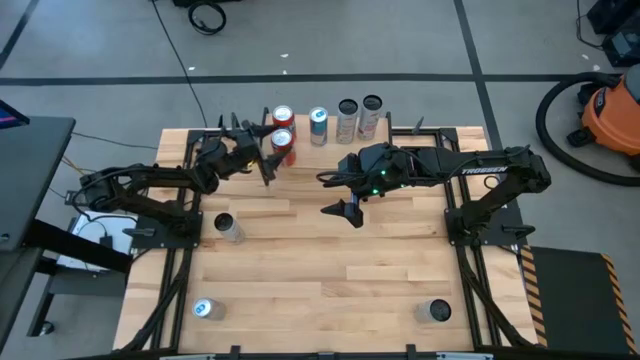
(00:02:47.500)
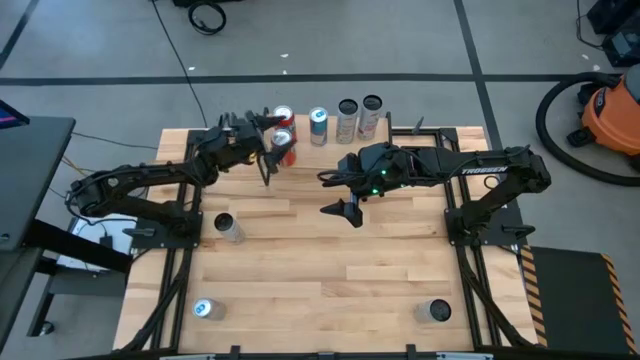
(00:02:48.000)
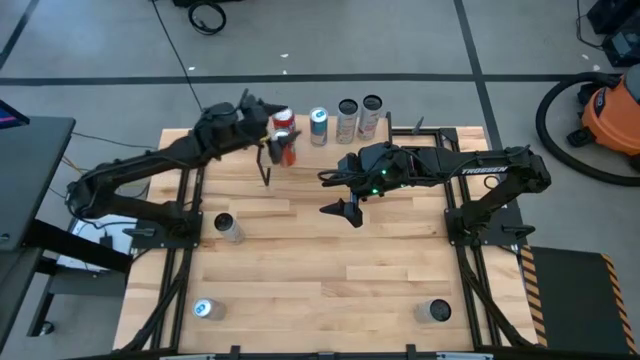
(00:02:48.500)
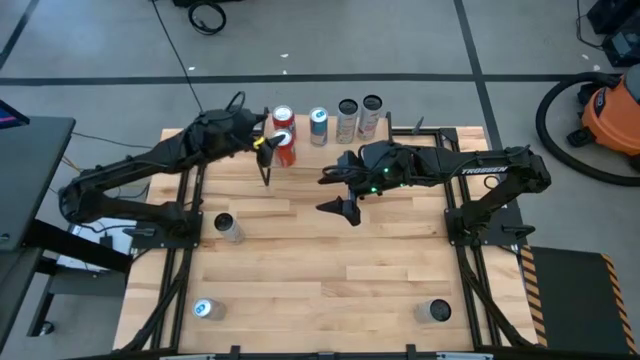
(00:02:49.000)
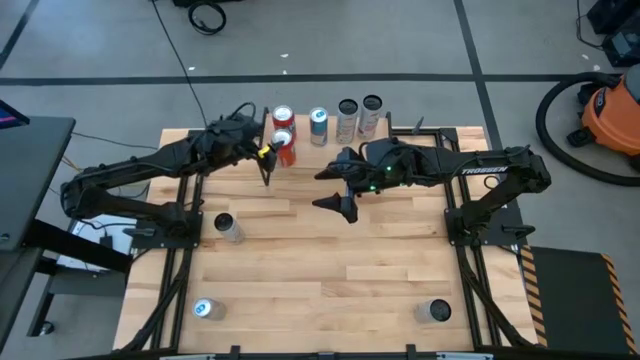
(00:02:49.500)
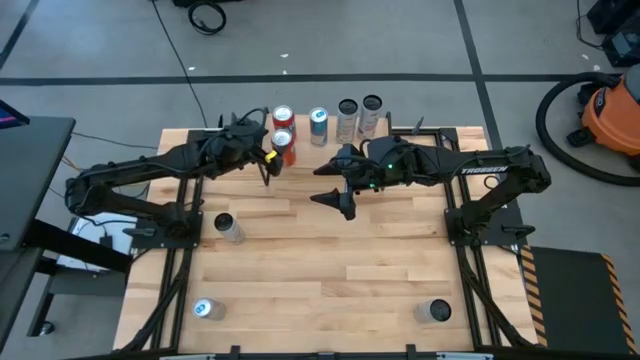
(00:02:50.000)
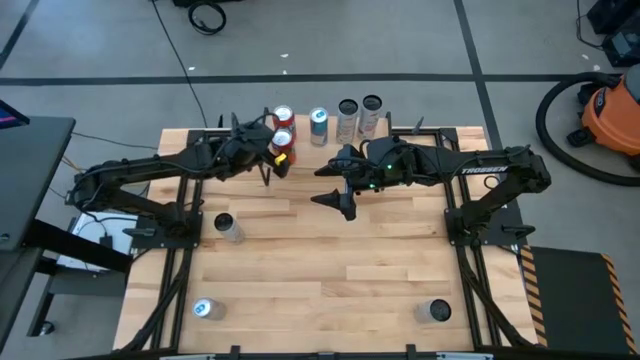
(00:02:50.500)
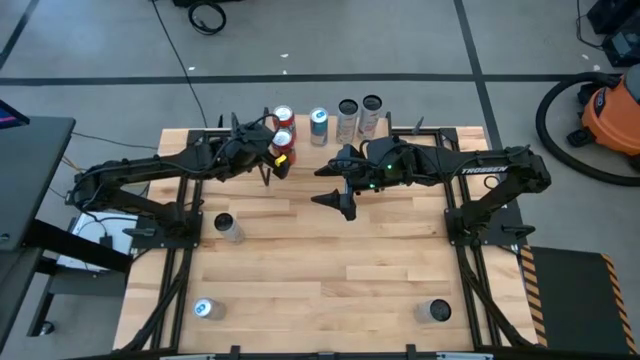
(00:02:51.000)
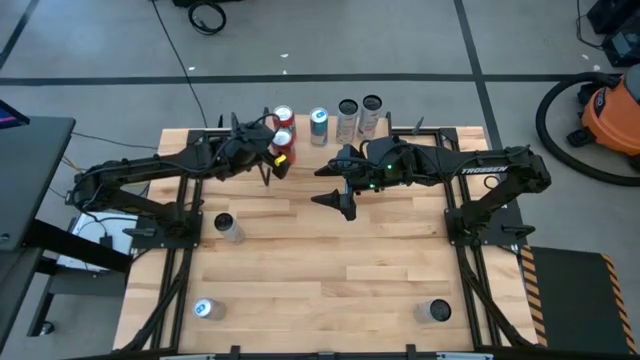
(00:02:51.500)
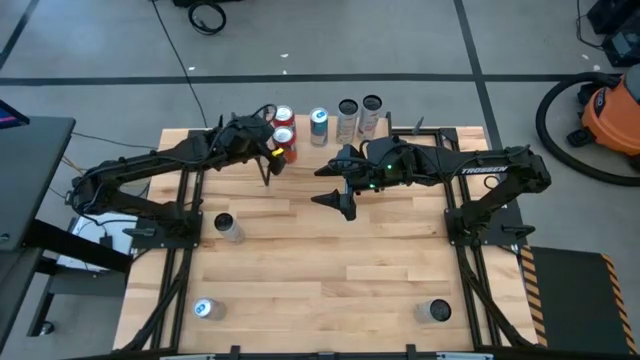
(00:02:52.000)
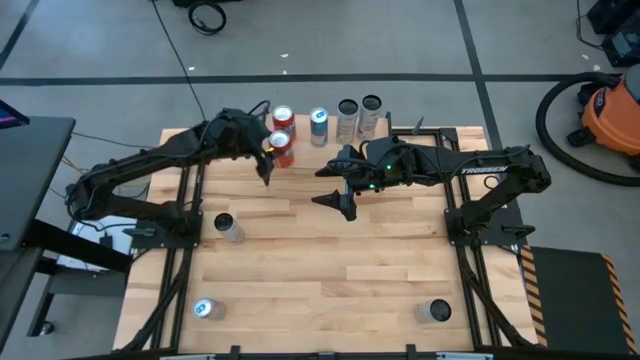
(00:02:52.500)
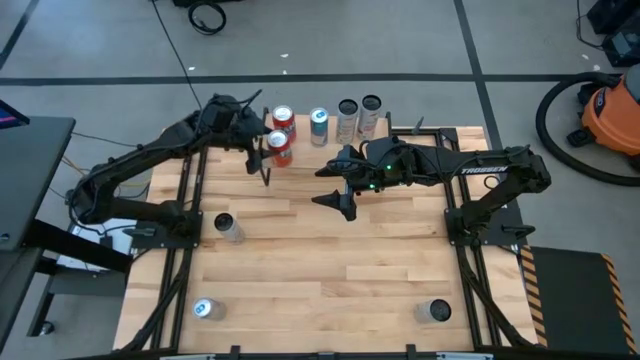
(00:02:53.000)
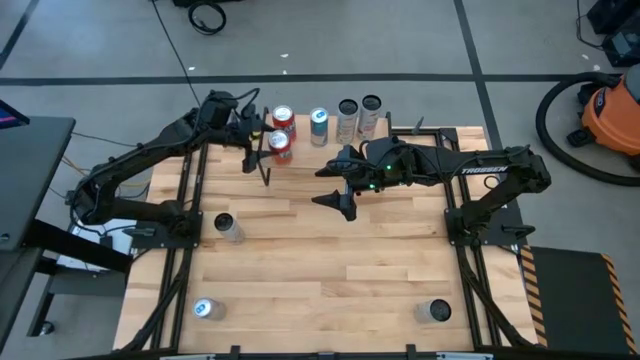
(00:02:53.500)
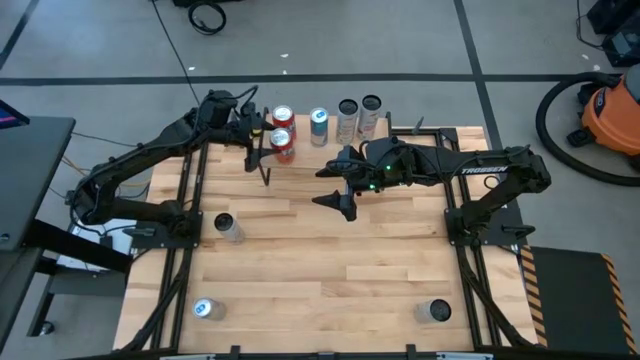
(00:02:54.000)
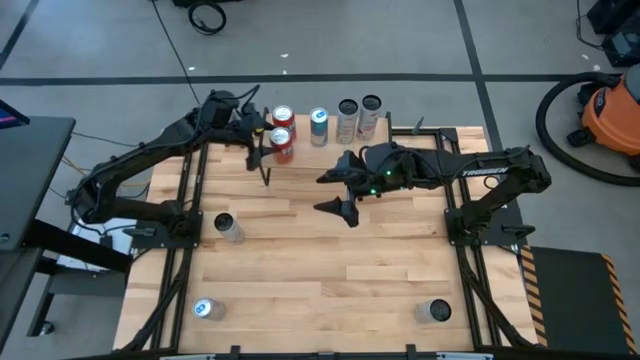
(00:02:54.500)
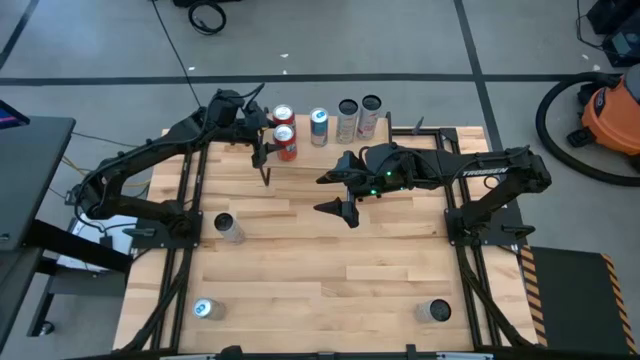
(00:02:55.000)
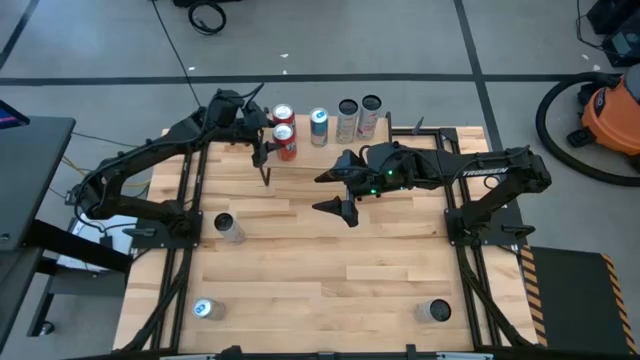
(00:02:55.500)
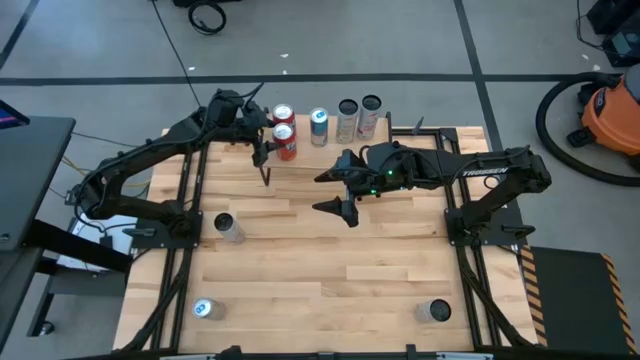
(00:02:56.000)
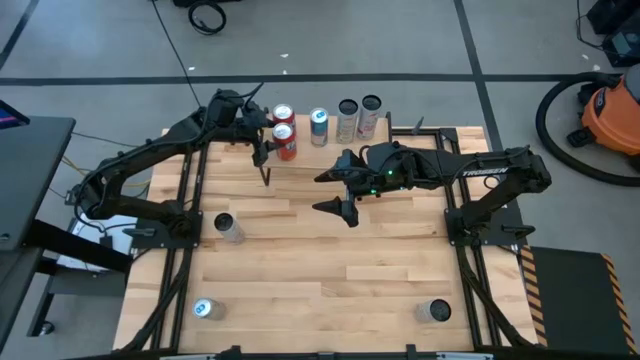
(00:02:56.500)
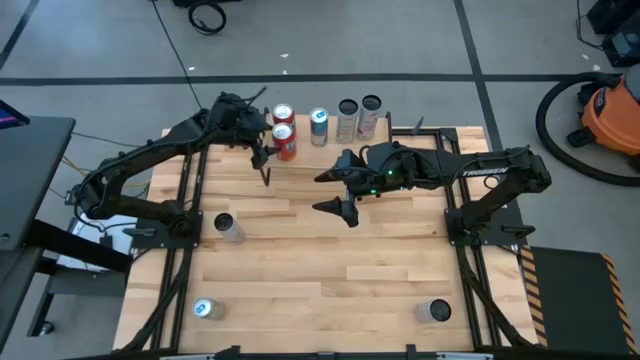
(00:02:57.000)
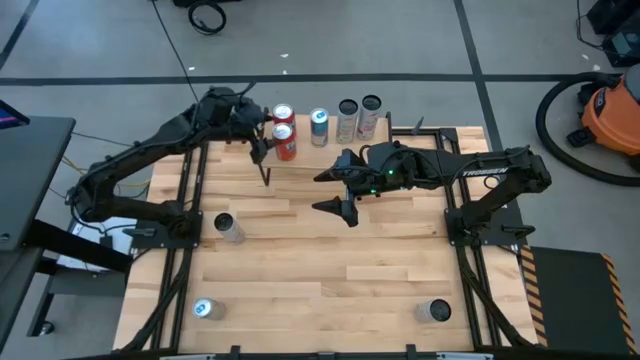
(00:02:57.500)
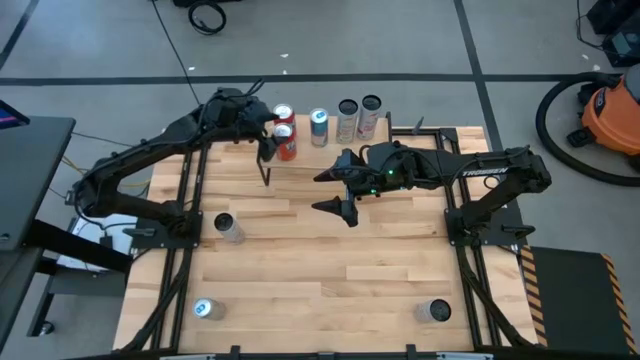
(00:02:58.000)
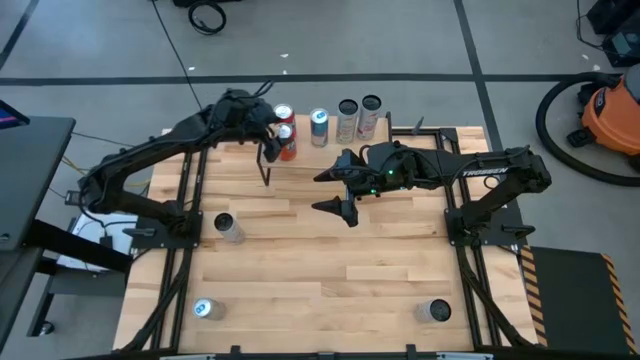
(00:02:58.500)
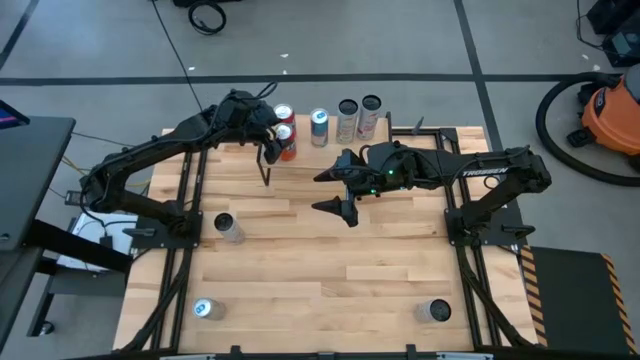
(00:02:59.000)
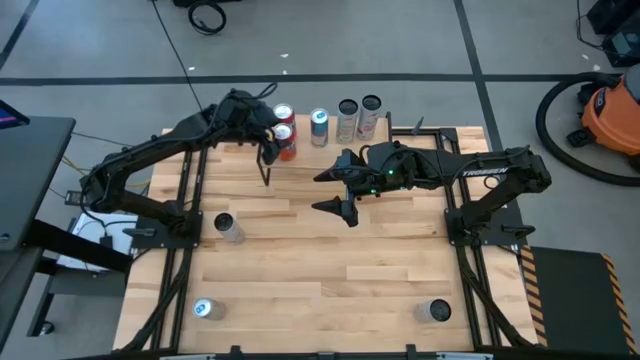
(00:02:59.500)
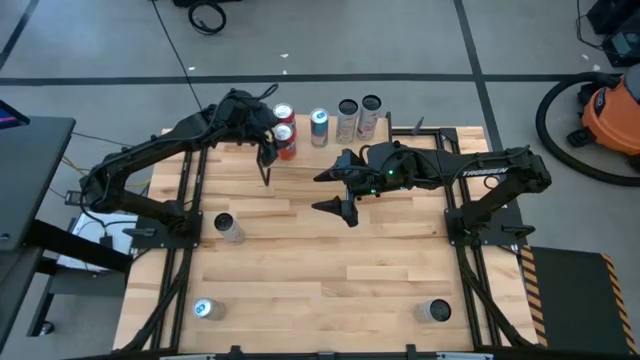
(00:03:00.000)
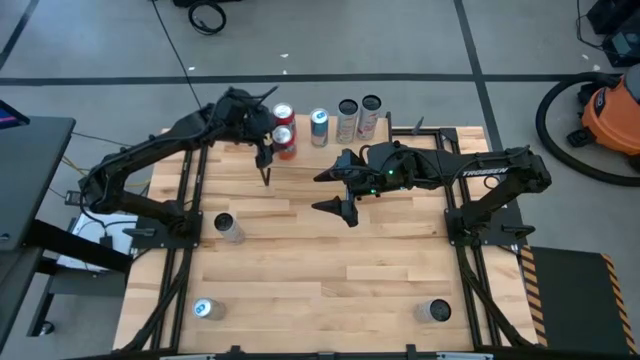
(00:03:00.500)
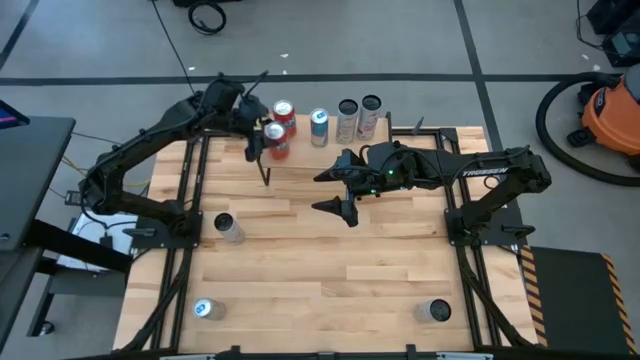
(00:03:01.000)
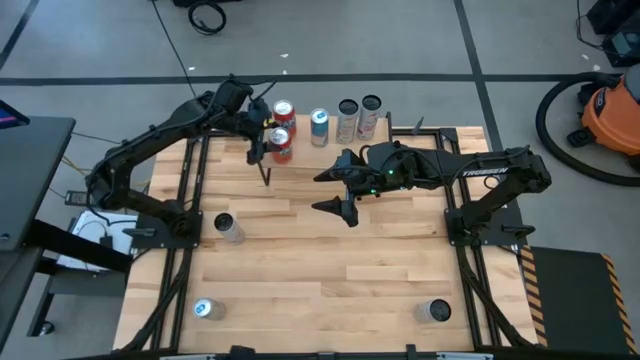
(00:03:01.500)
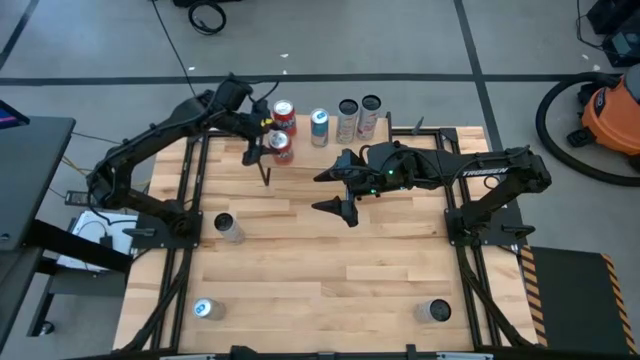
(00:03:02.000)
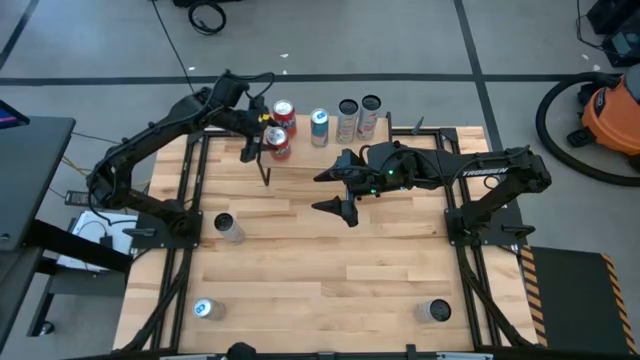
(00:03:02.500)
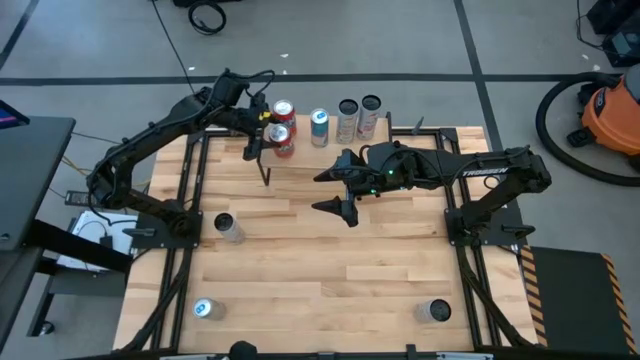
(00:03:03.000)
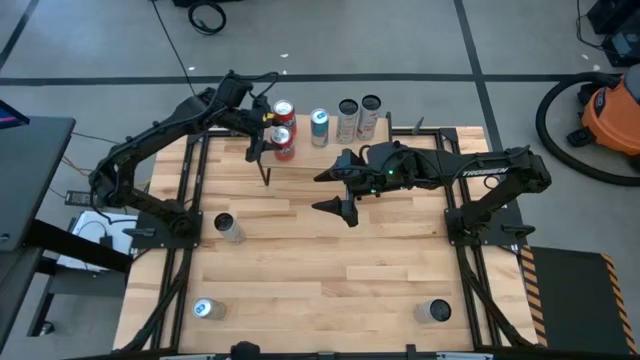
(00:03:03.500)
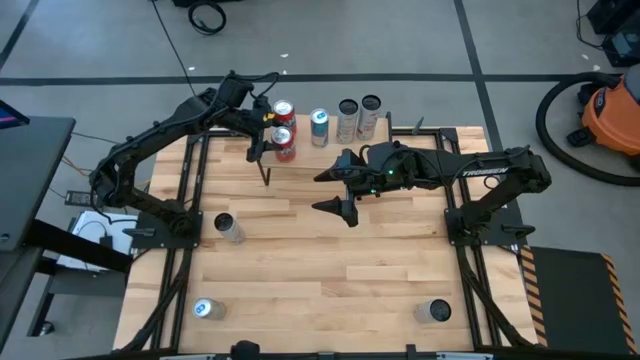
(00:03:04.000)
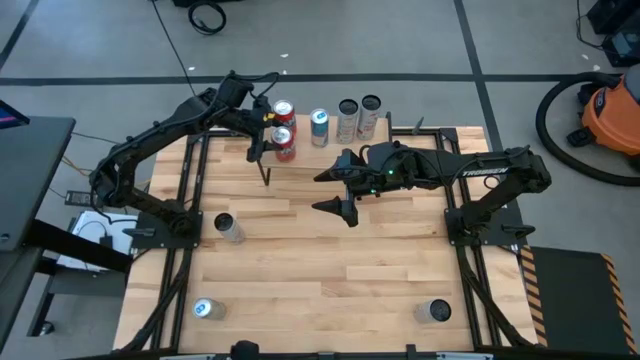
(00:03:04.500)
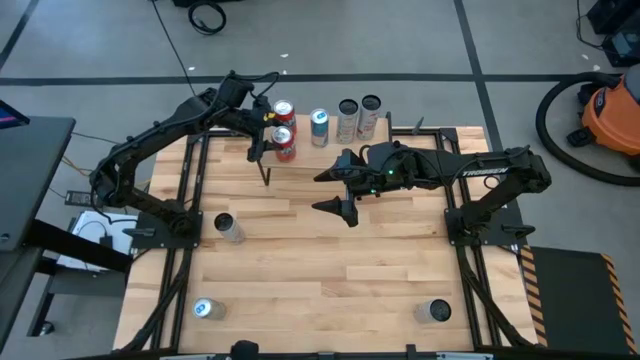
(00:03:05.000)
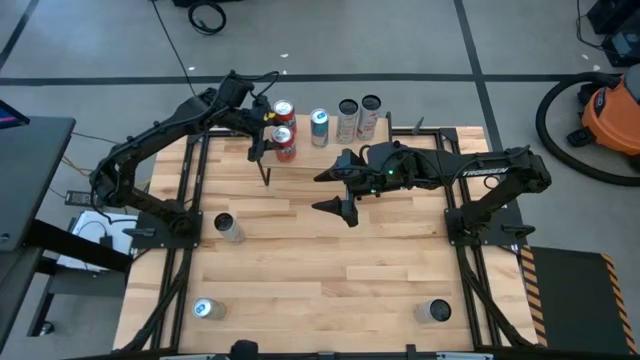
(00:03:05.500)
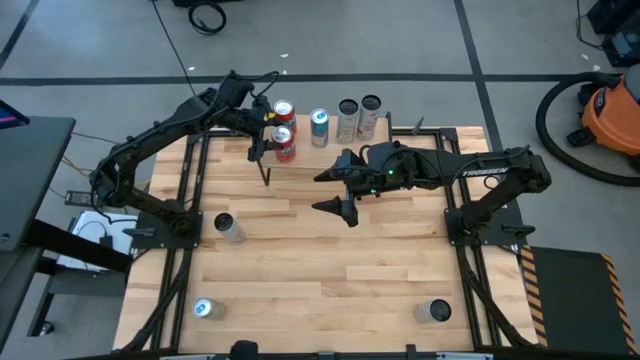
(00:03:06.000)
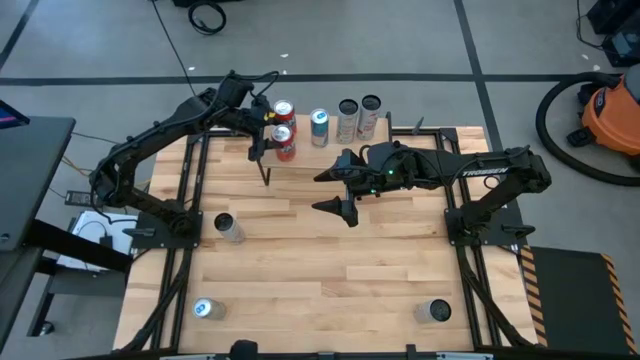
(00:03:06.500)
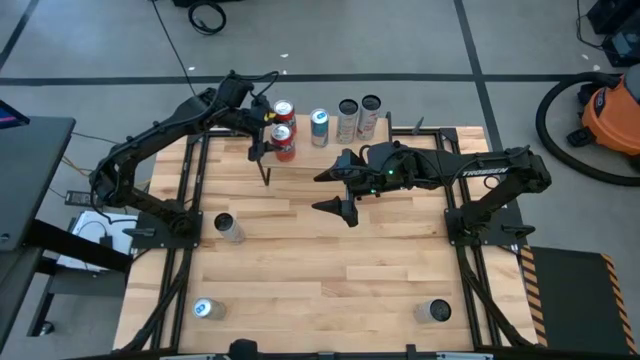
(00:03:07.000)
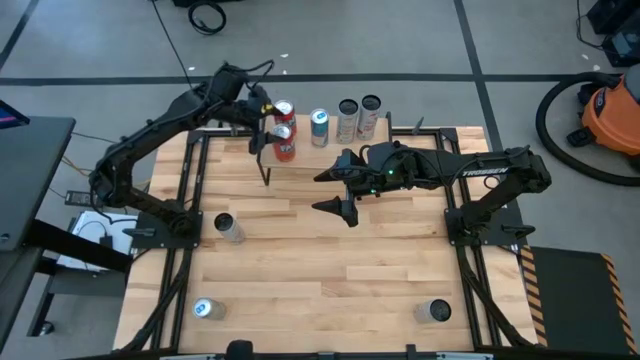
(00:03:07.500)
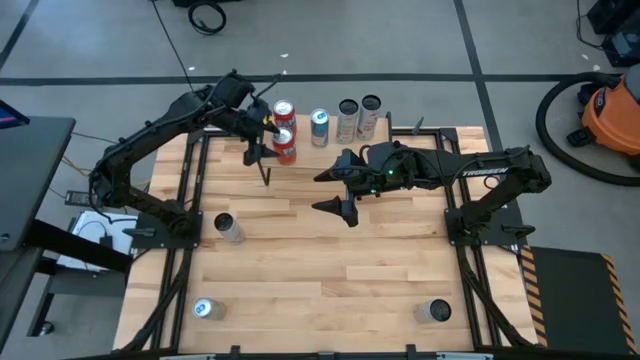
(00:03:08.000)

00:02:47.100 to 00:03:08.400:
Task: Place canned beverage on shelf
Put the left red soda can on the shelf
